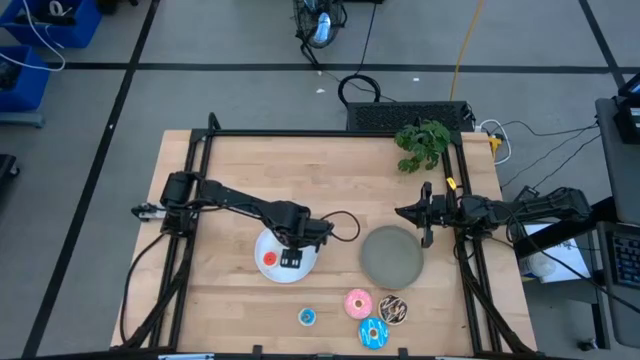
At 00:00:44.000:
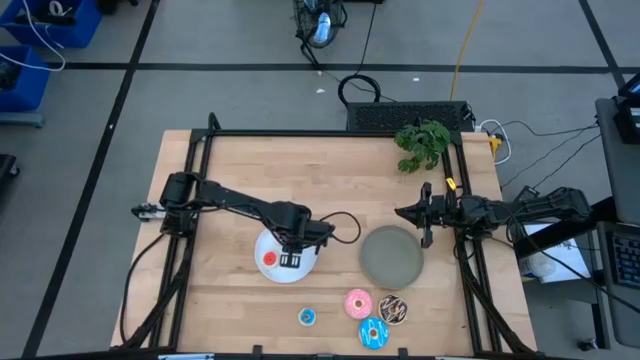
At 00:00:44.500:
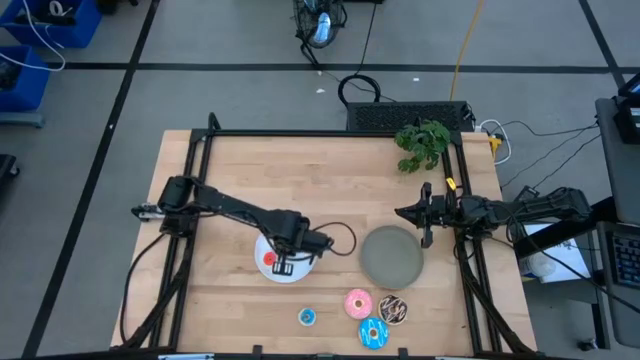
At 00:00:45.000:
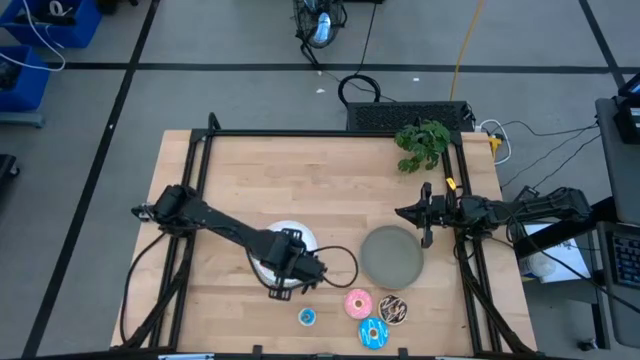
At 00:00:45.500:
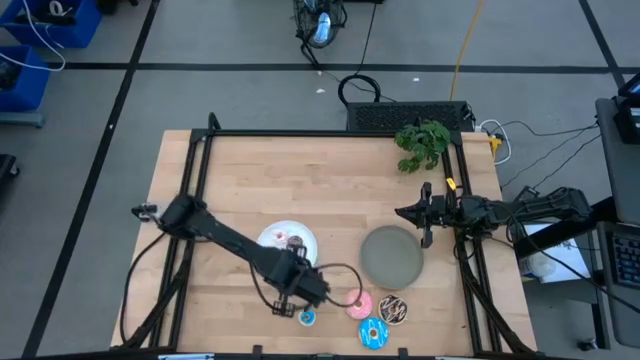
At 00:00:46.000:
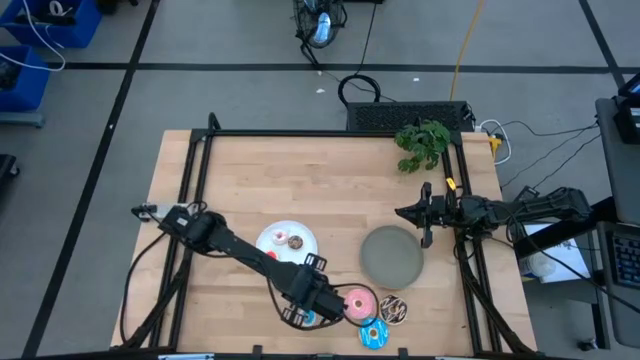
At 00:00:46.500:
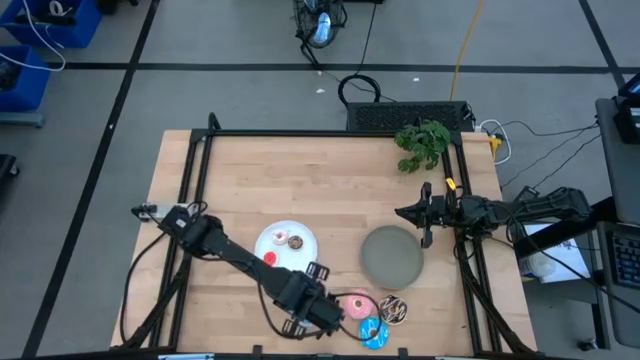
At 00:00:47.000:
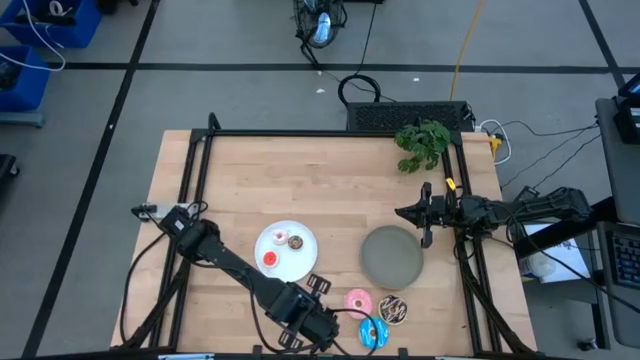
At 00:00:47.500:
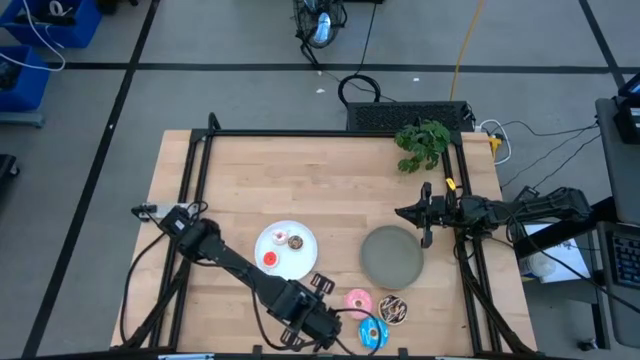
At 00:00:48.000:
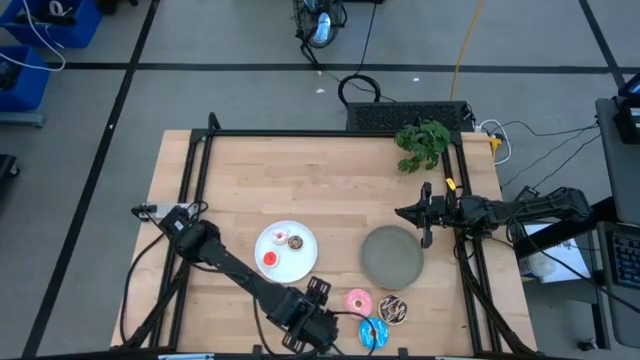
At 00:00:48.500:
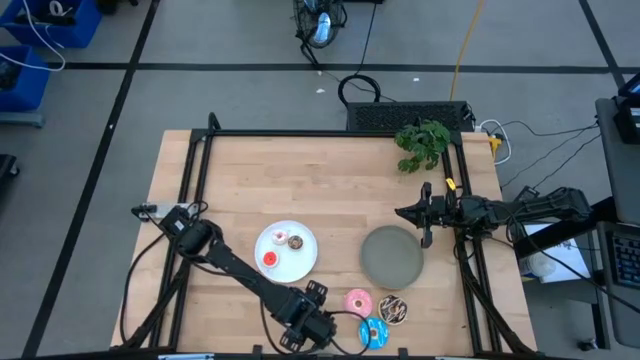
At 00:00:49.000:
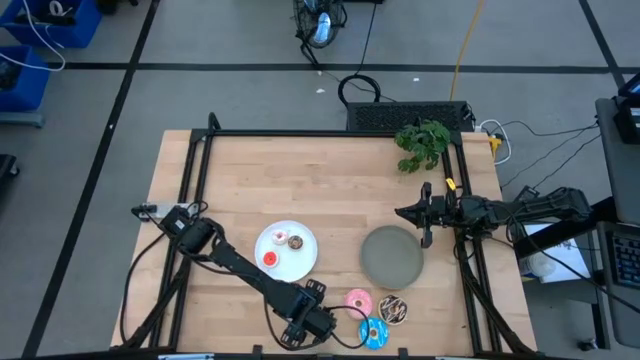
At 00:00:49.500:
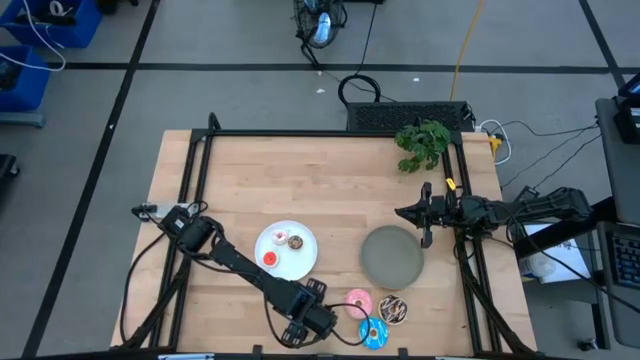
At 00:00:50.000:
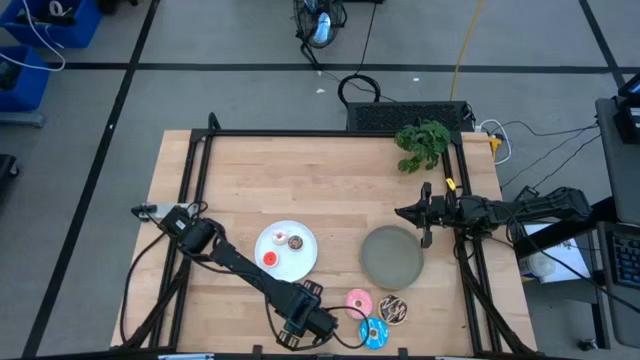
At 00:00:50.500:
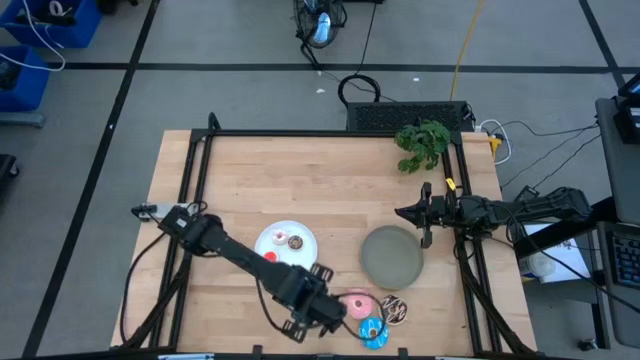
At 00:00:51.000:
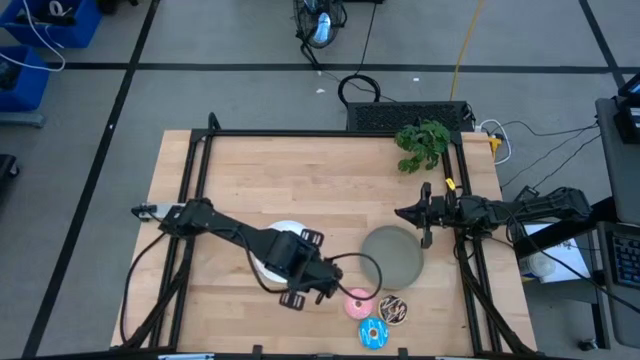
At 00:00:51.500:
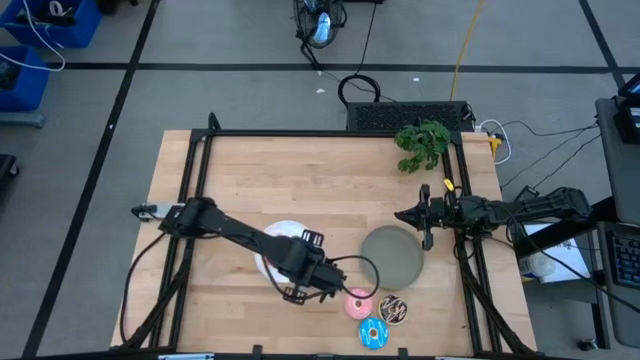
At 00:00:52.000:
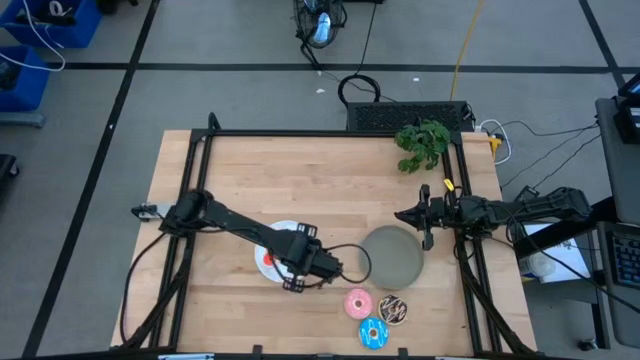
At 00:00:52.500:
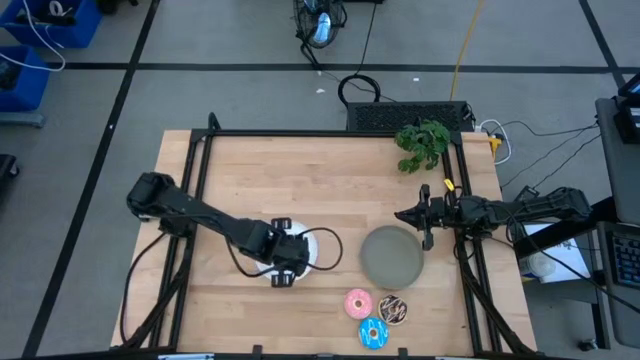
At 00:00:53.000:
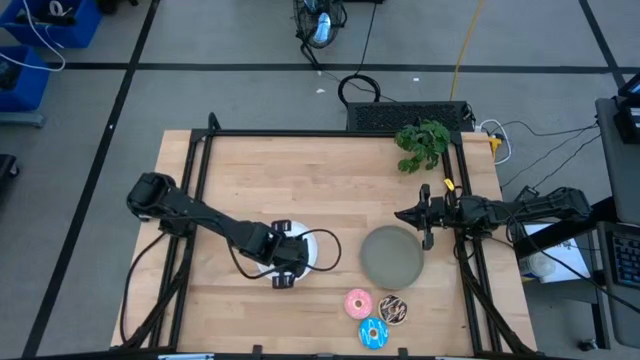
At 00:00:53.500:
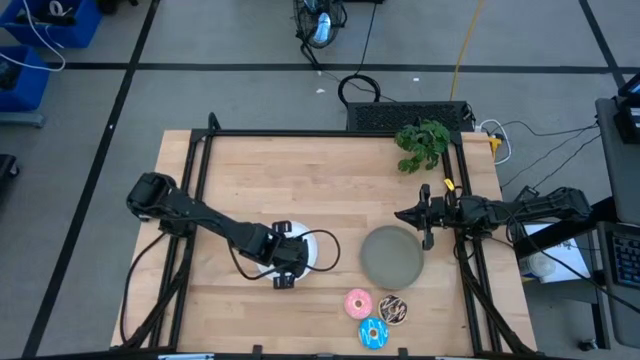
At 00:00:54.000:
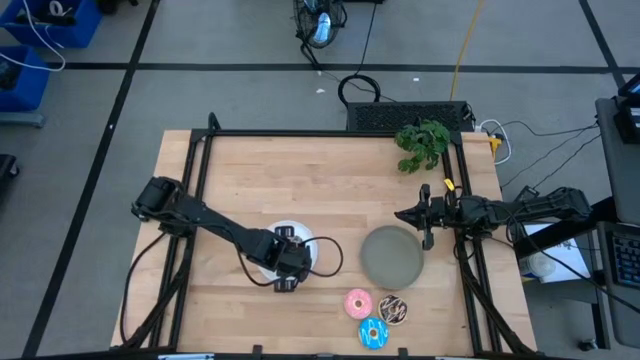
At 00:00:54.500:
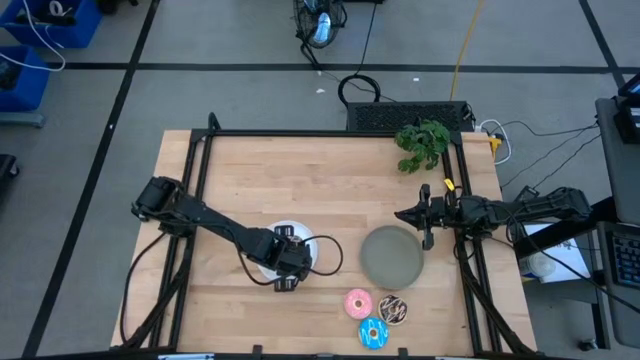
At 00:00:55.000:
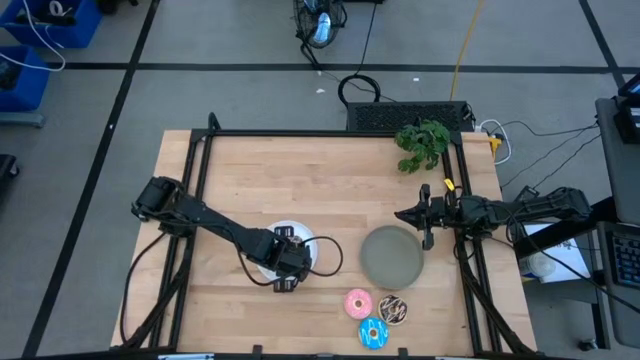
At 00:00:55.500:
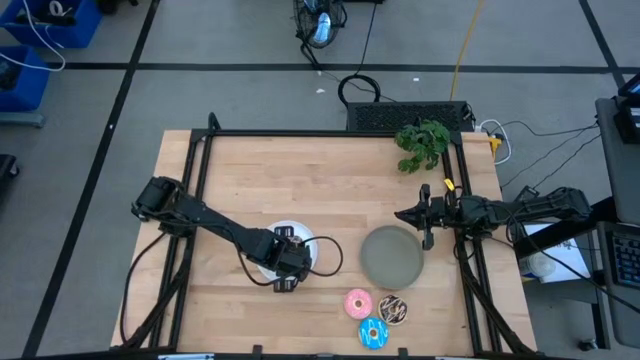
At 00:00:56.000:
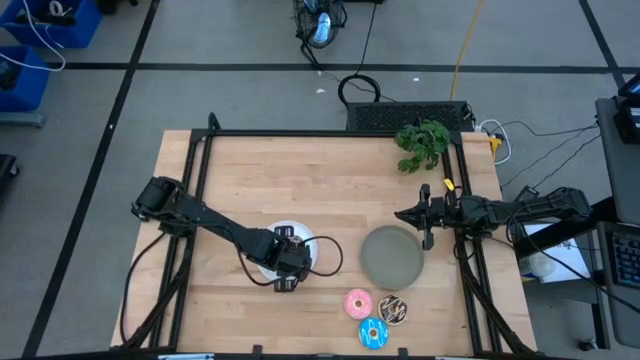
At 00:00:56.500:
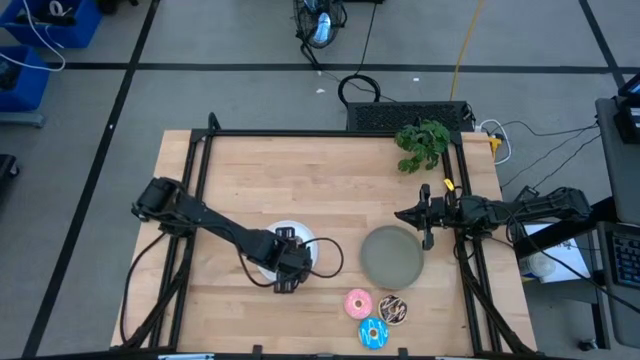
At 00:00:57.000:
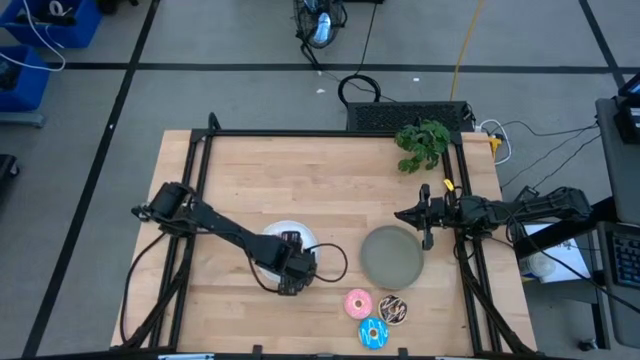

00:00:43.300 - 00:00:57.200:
Task: Pick & Place donuts
Put the small blue donut on the white plate

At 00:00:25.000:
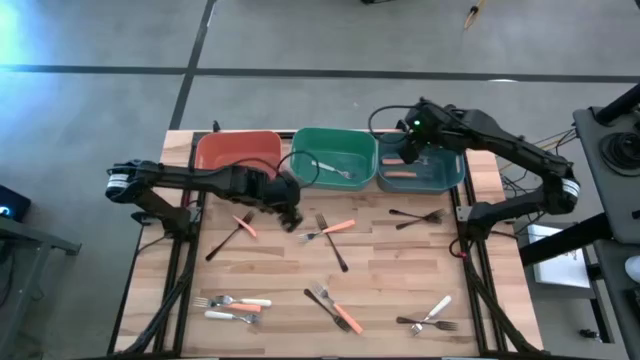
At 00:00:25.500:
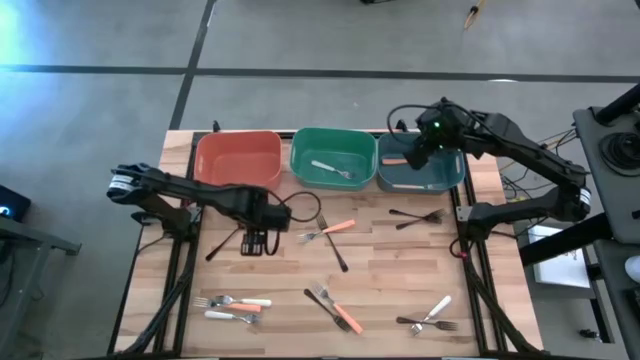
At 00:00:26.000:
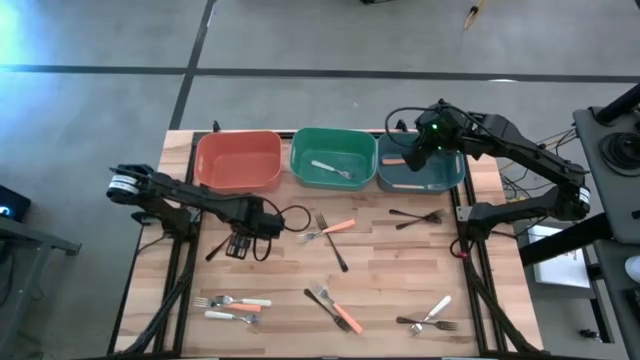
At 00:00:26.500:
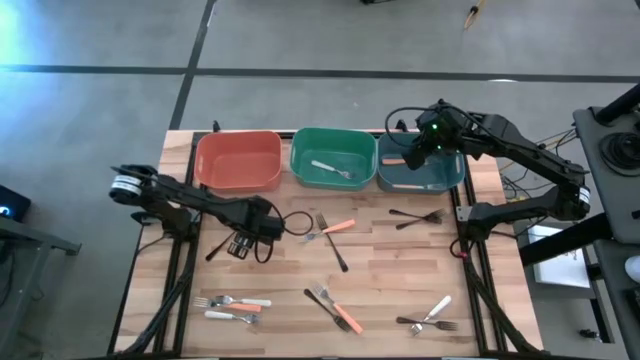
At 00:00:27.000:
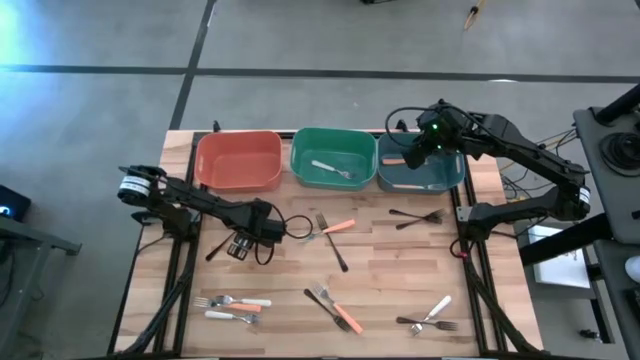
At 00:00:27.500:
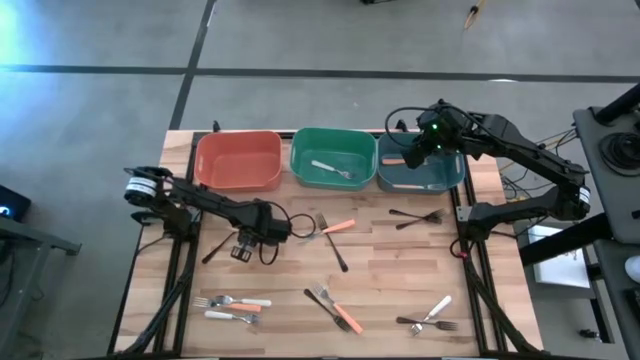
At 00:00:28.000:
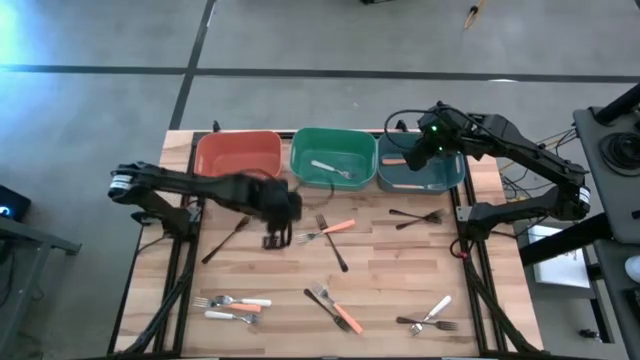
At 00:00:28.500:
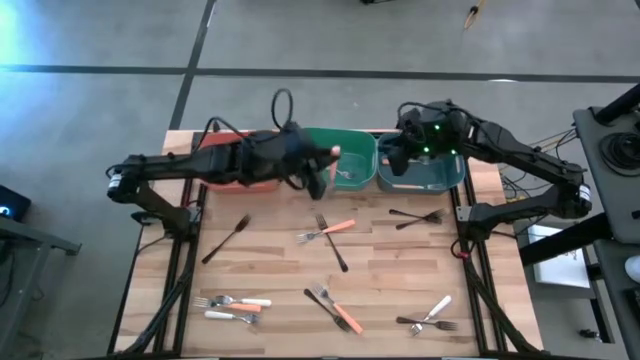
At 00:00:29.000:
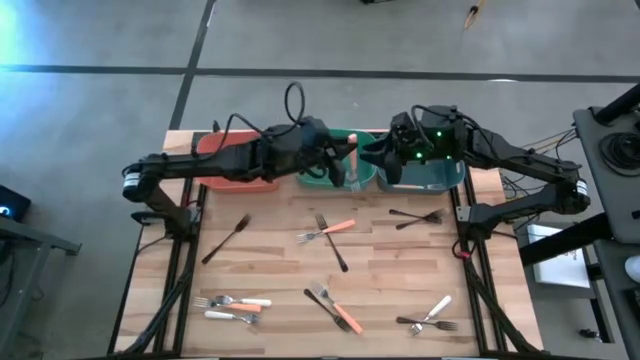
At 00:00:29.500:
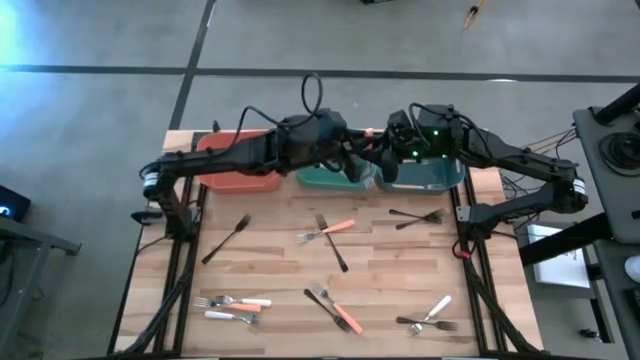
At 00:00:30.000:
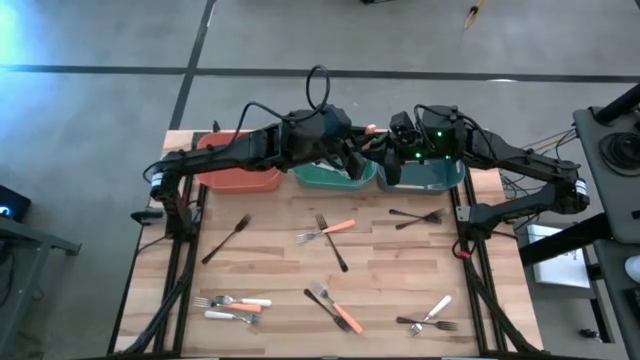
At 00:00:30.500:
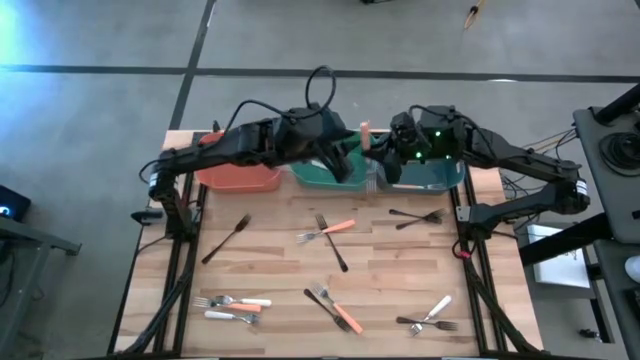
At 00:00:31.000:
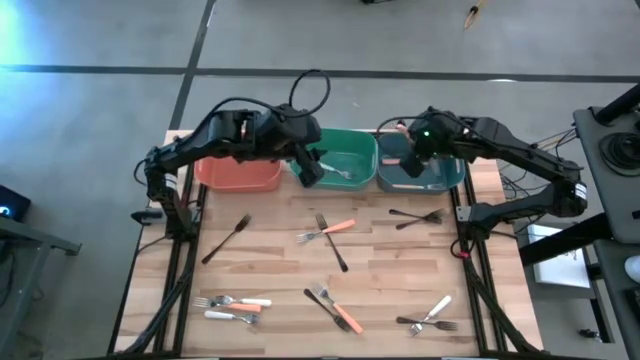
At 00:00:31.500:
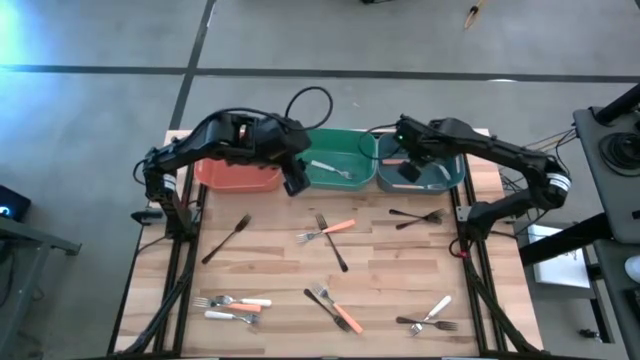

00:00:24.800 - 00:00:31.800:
Task: Sort silverware by color (type)
Put the light orange fork into the blue bin
